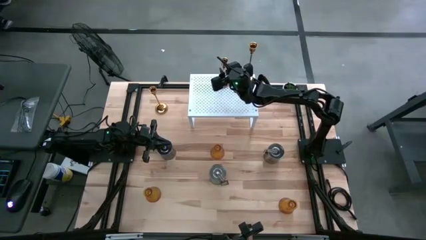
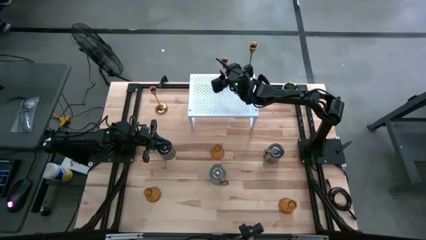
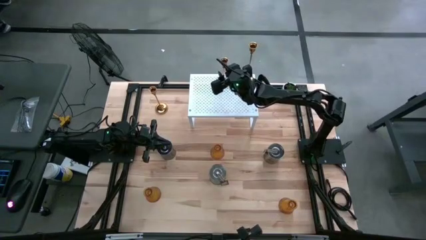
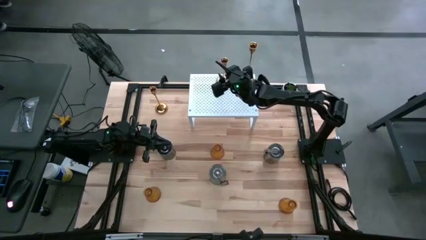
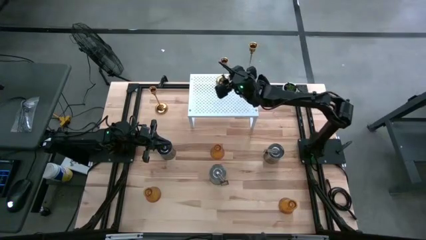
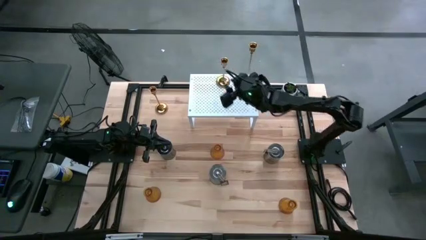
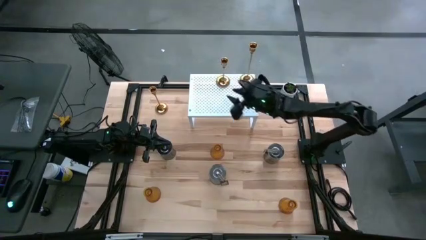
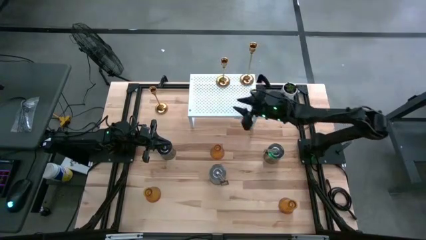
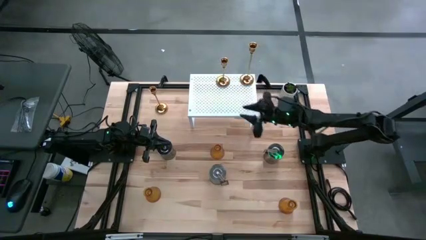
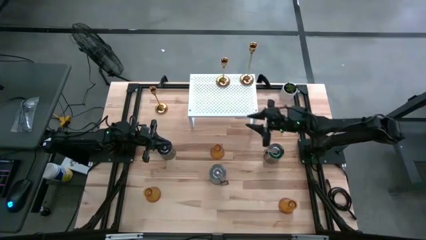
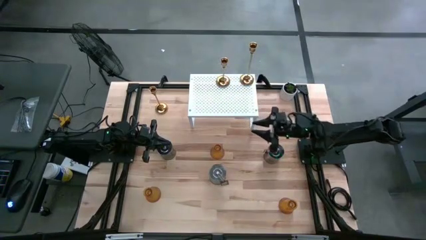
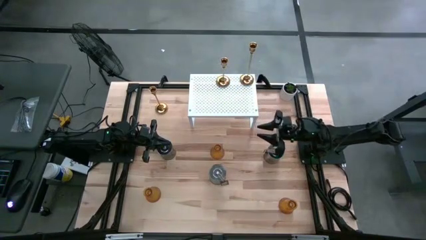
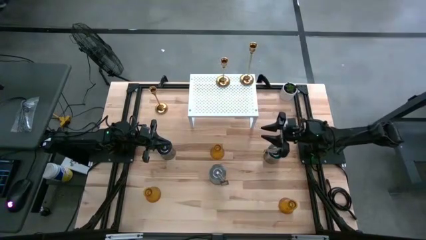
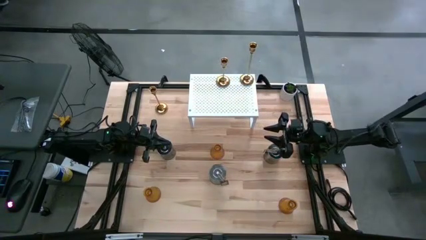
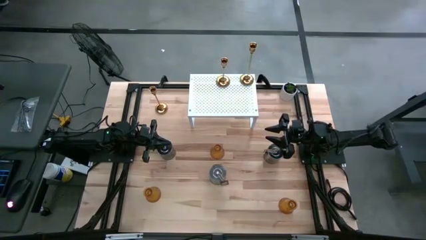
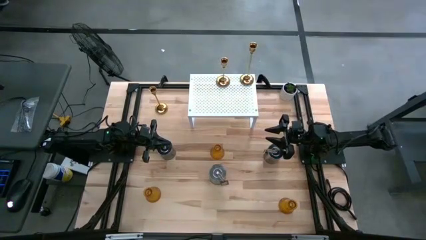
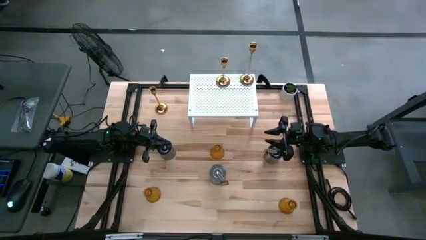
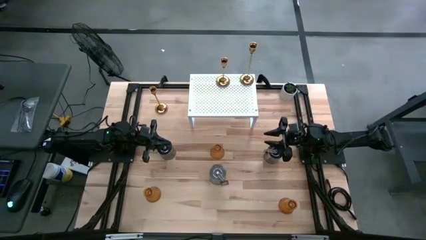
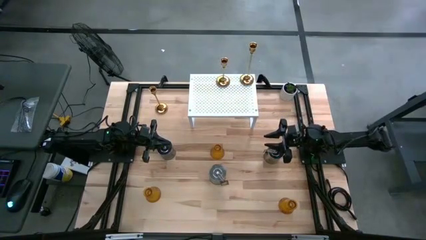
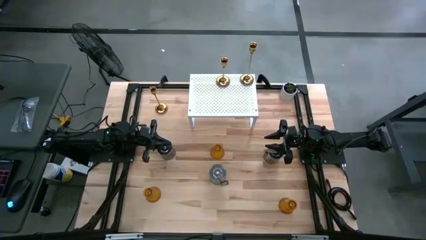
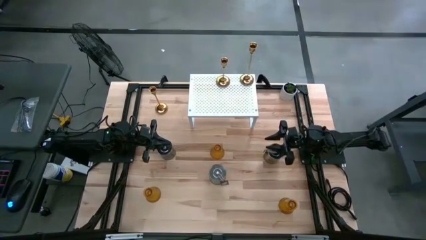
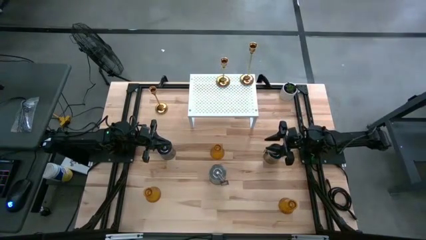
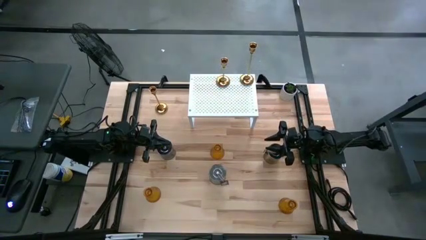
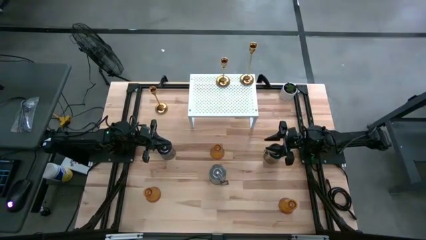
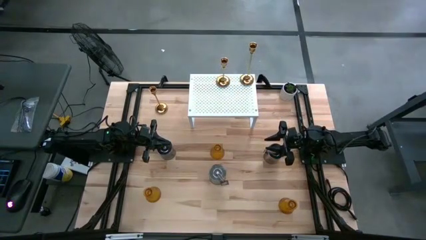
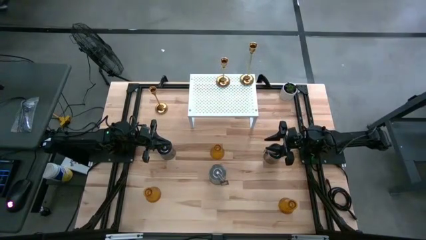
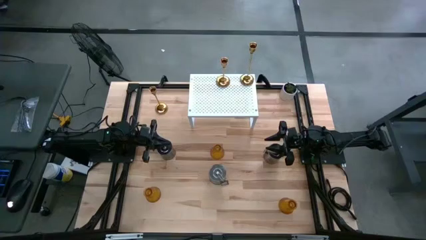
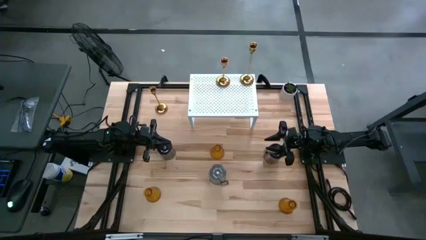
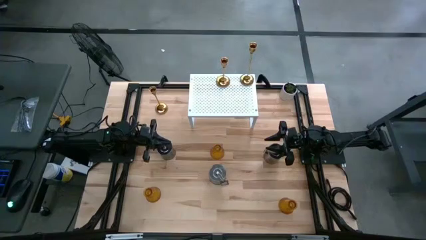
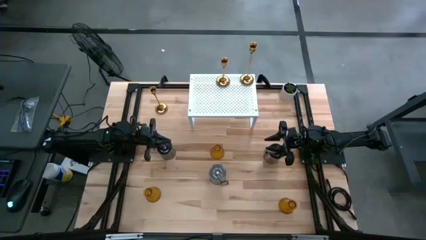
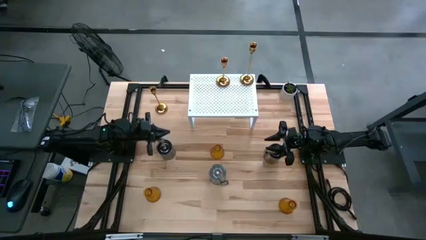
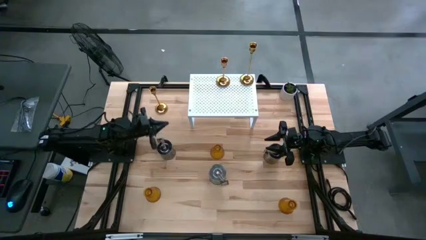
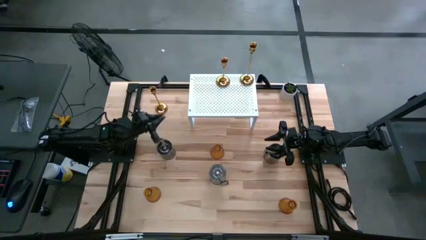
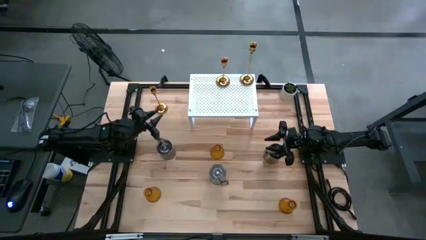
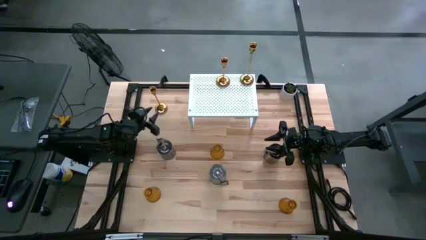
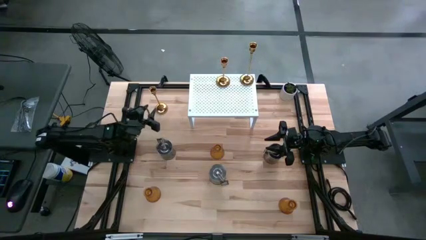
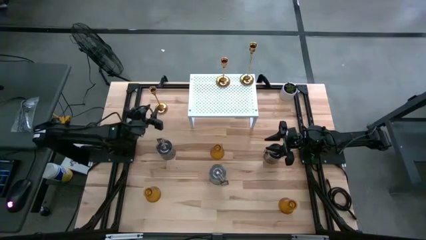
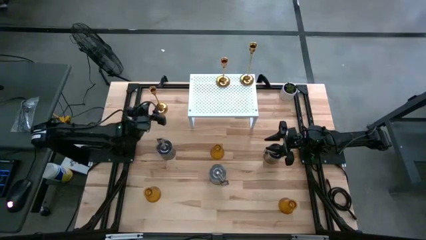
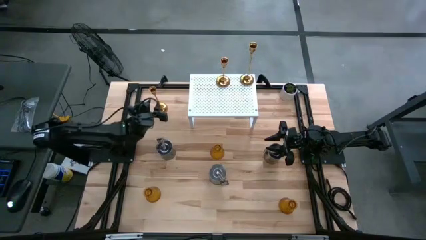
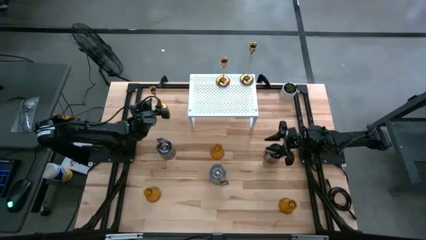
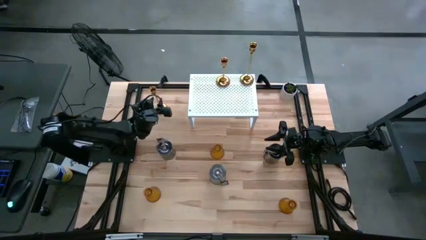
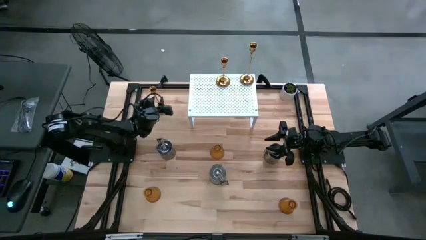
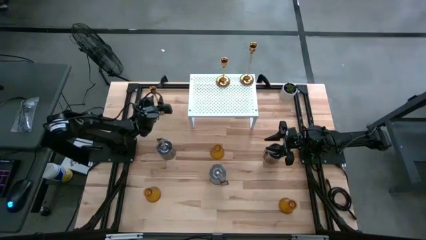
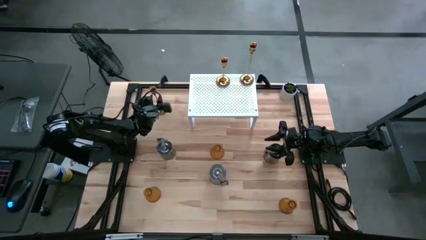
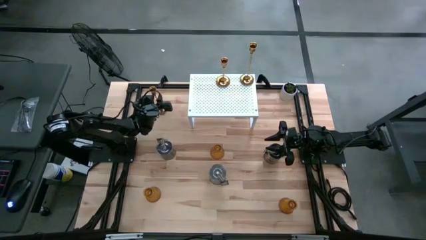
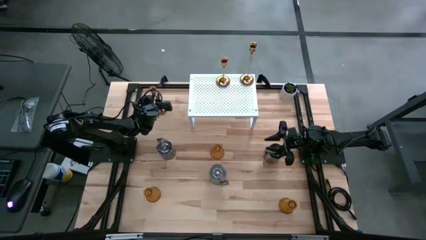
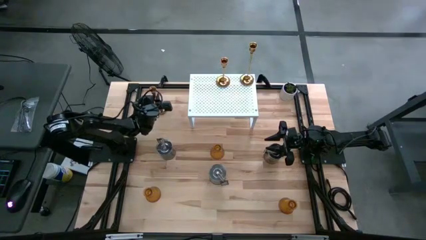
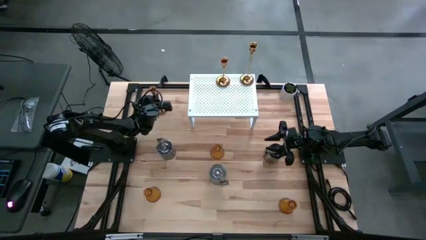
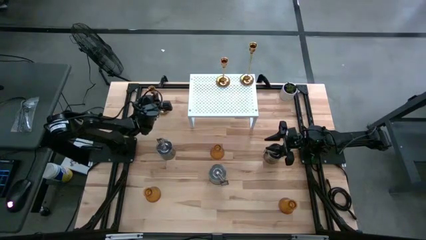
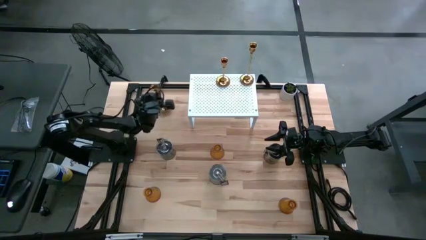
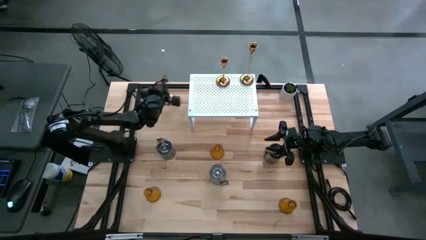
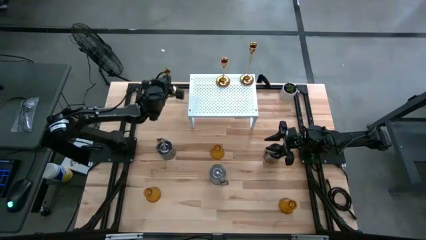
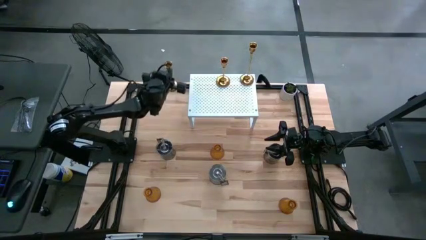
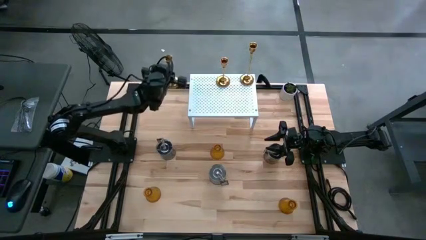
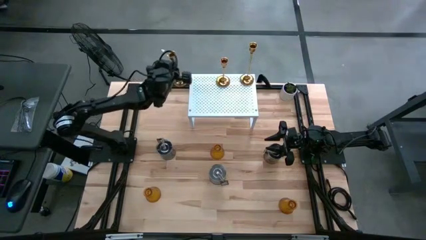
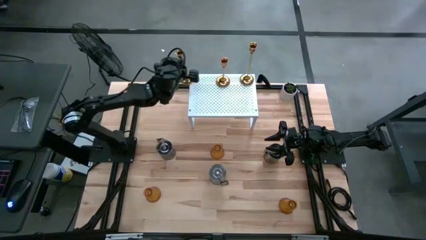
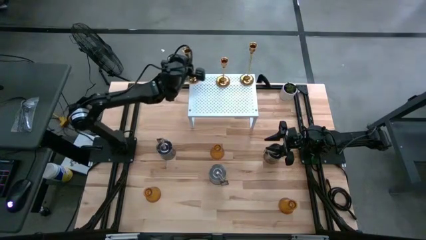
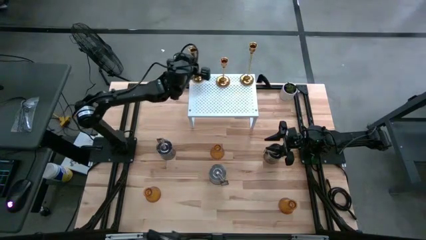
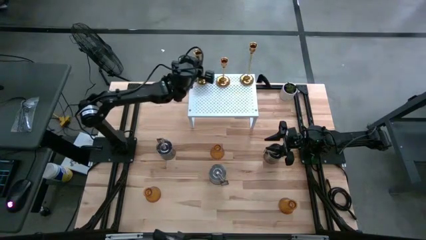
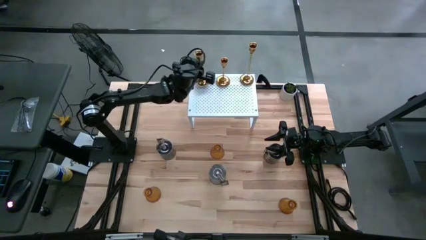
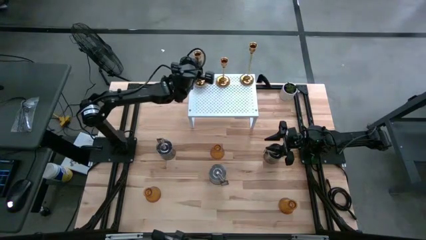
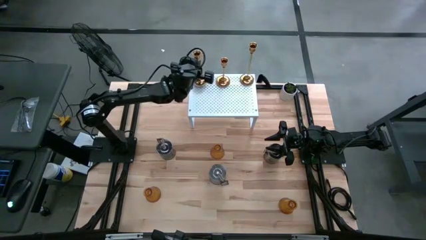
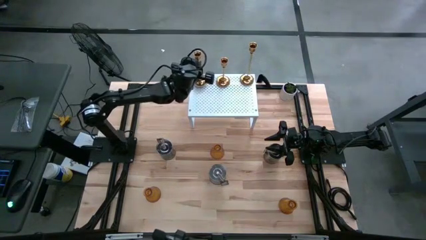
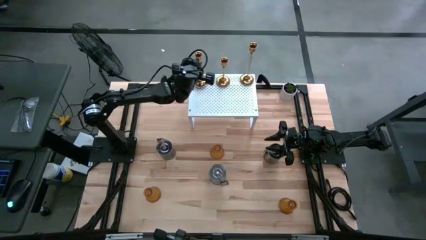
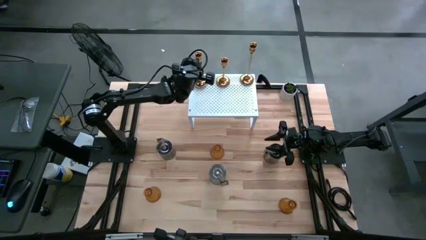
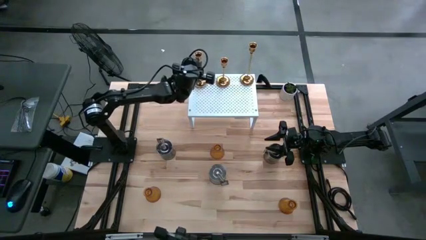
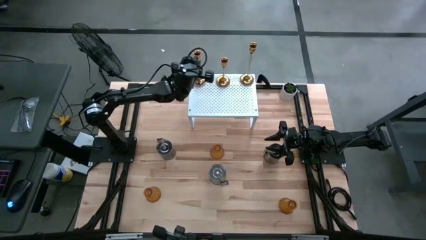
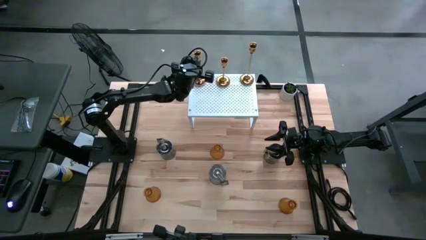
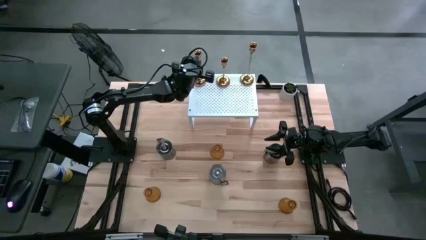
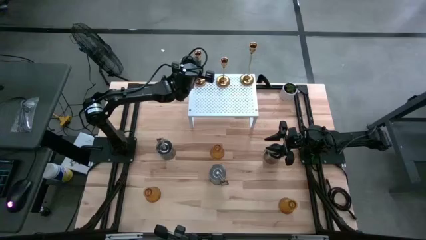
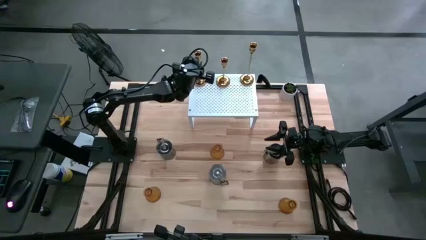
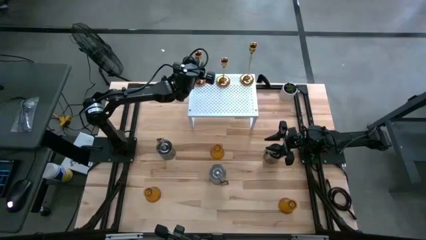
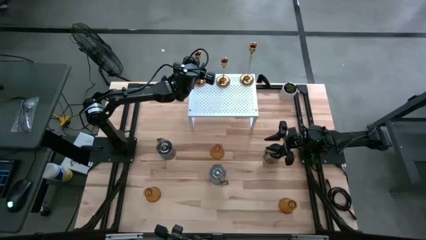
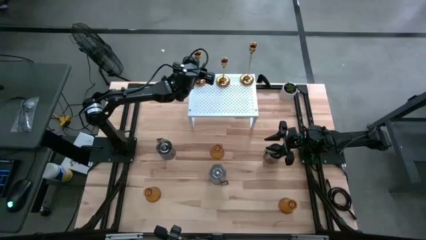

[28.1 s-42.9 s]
Task: Pick & Place candle stick holders
Put the gold candle holder on the shelf

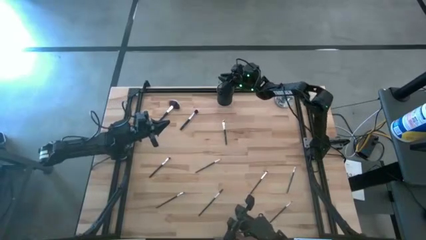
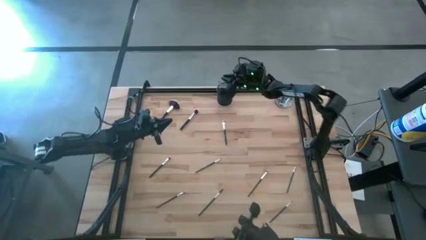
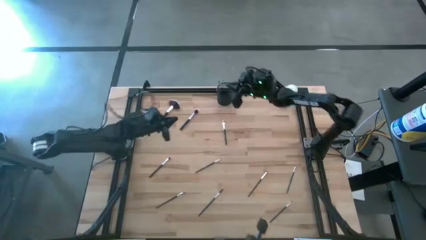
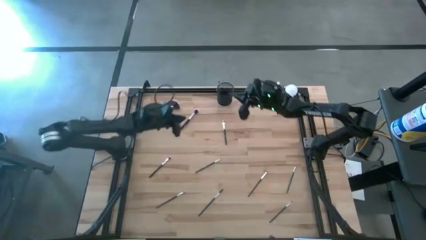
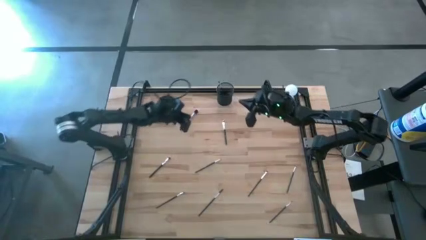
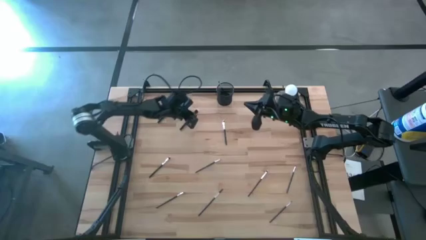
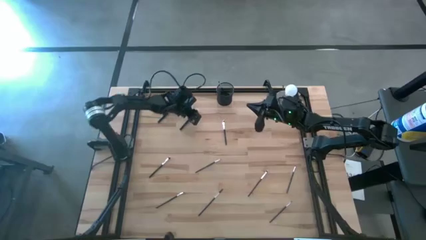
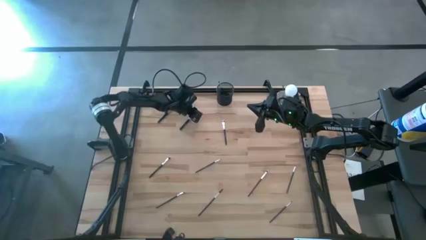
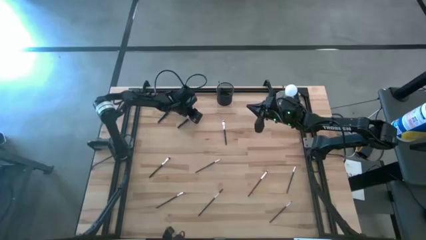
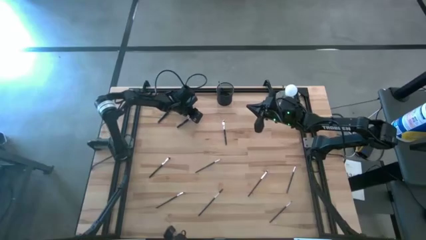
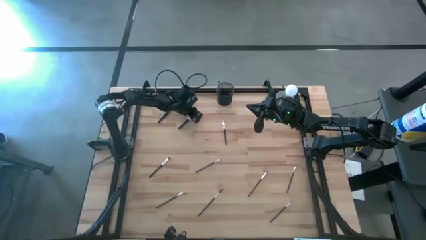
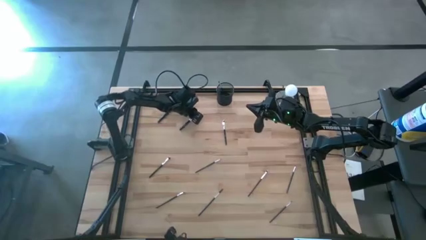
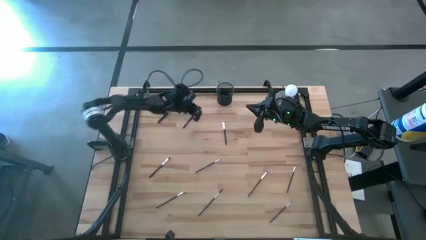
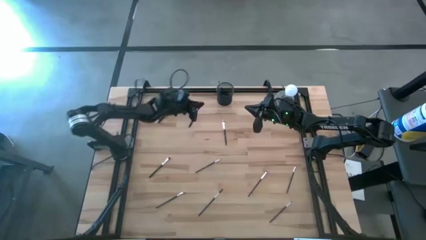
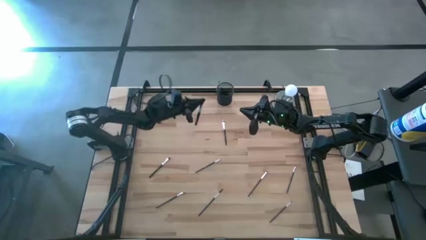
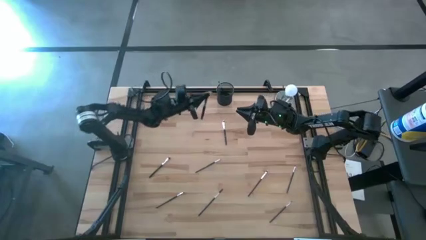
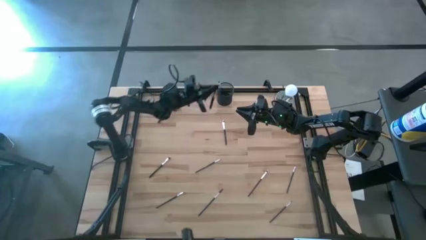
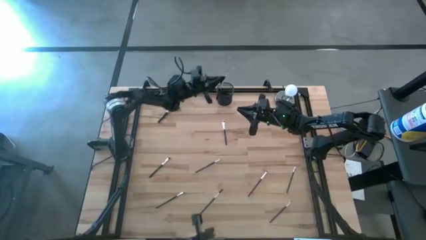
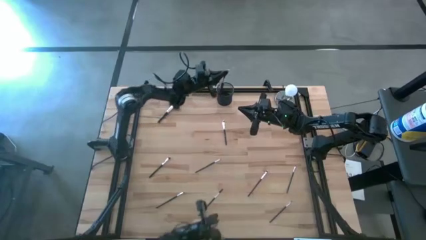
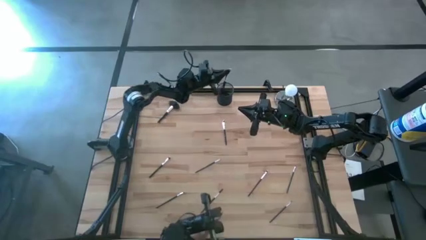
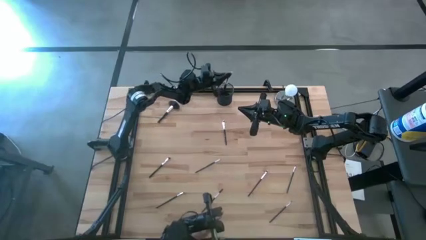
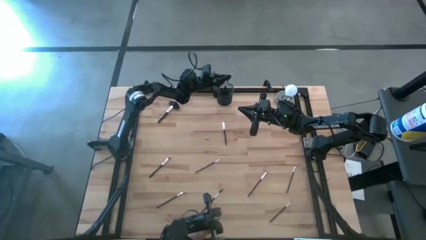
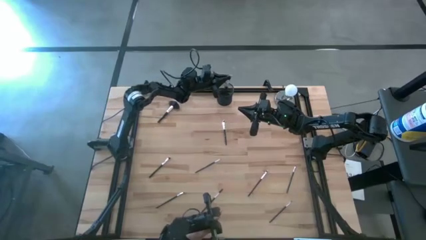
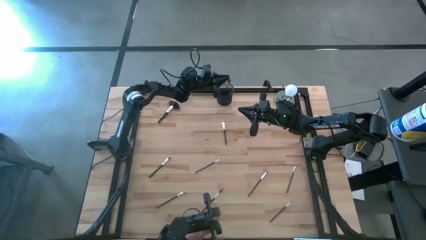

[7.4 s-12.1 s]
Task: Put items in baskets/containers
Put the black foundation brush into the black pen holder
